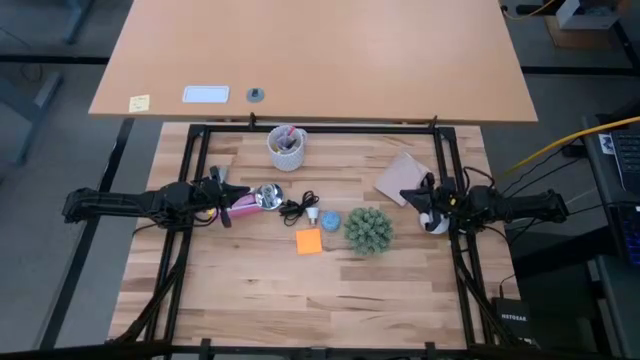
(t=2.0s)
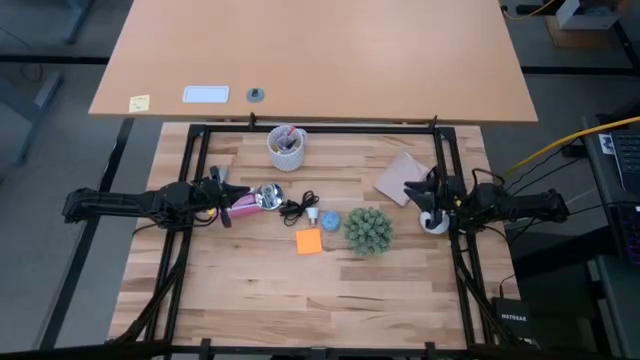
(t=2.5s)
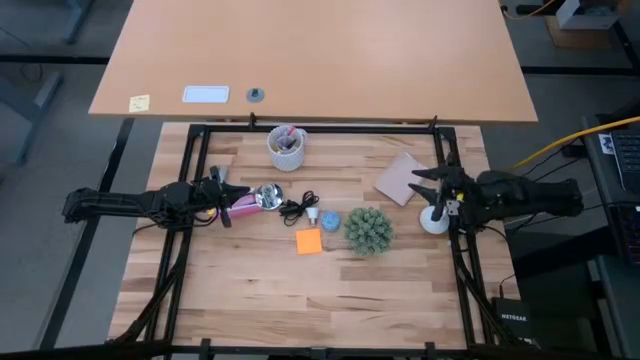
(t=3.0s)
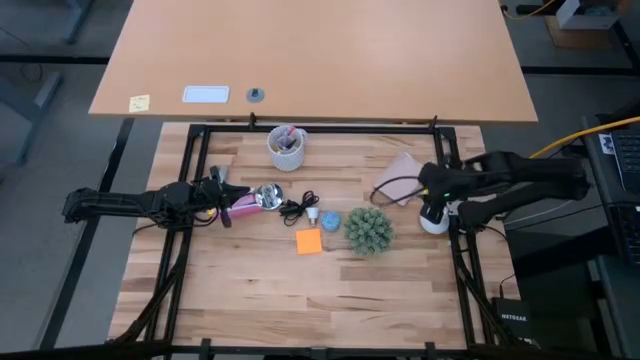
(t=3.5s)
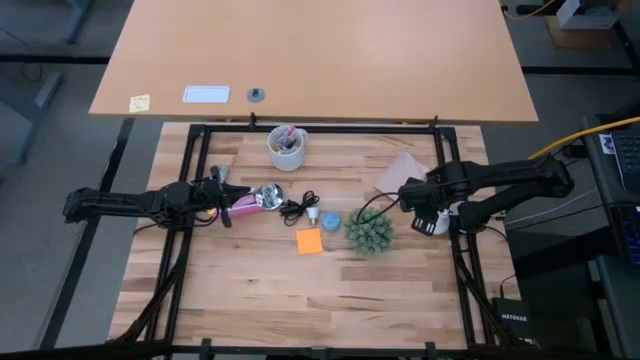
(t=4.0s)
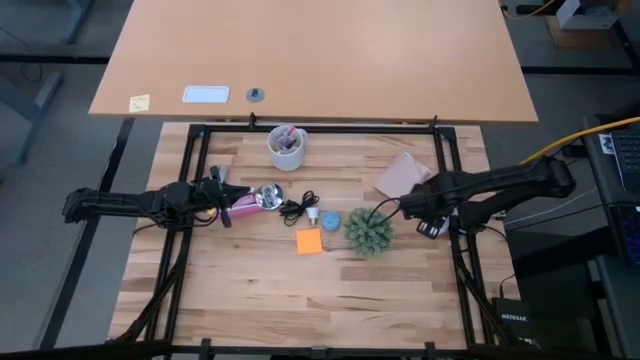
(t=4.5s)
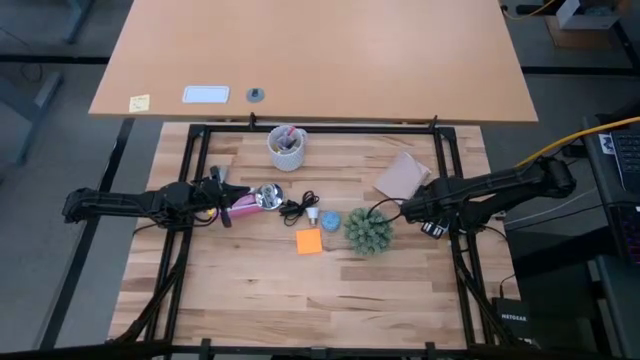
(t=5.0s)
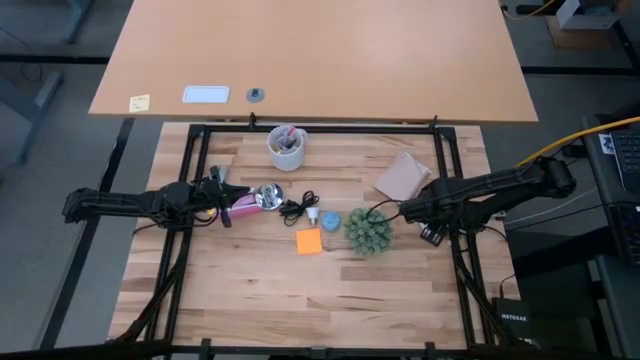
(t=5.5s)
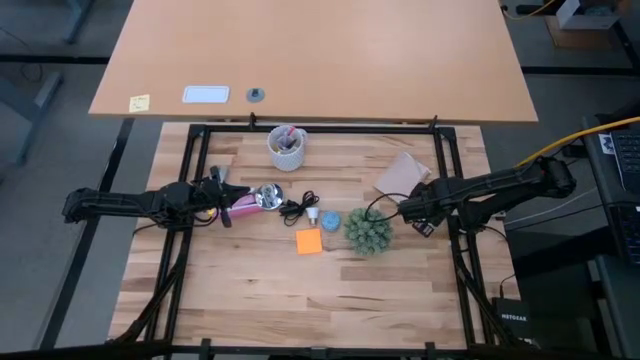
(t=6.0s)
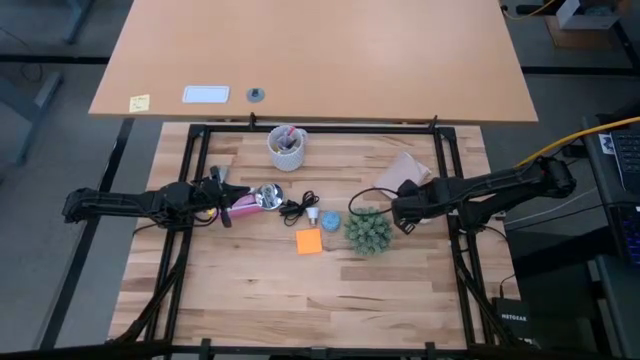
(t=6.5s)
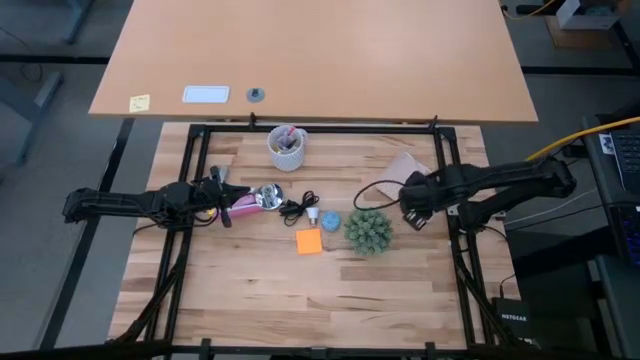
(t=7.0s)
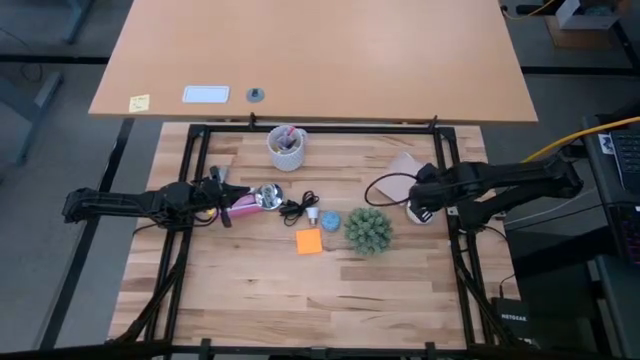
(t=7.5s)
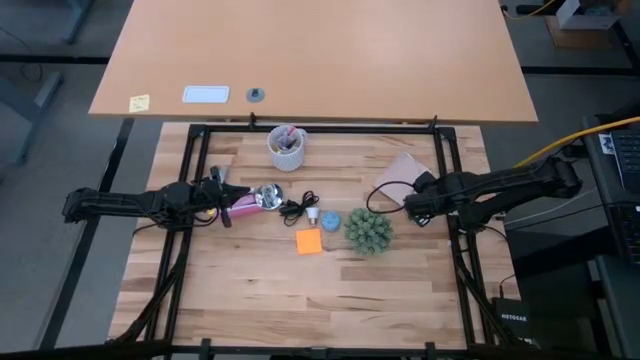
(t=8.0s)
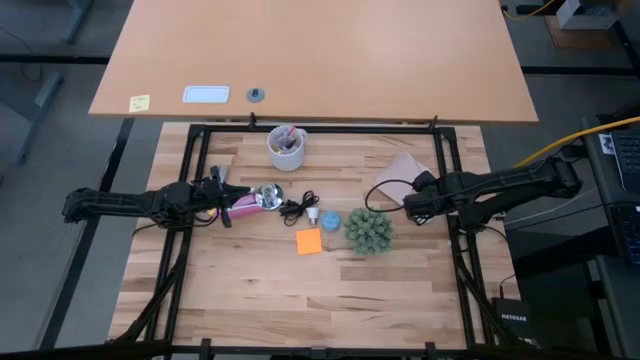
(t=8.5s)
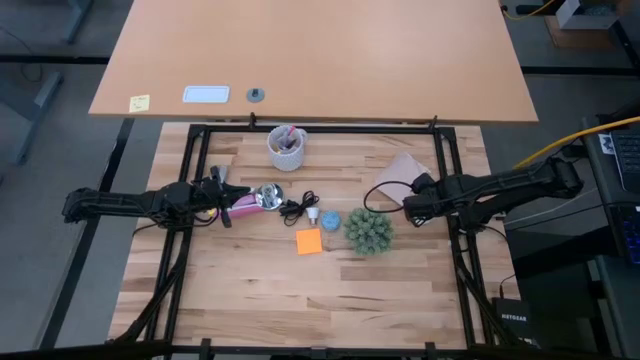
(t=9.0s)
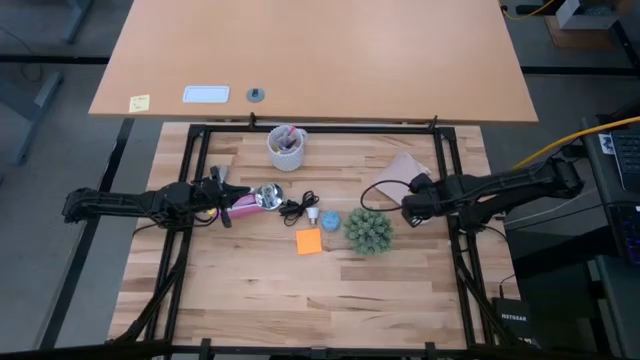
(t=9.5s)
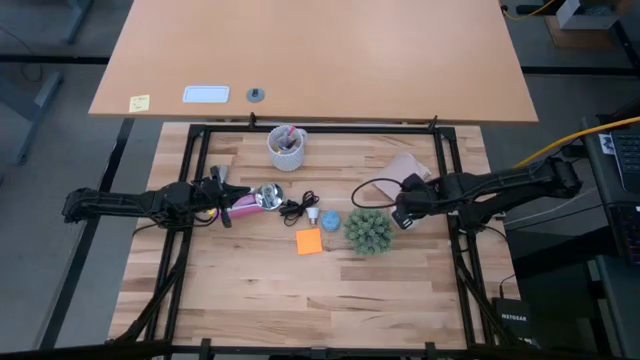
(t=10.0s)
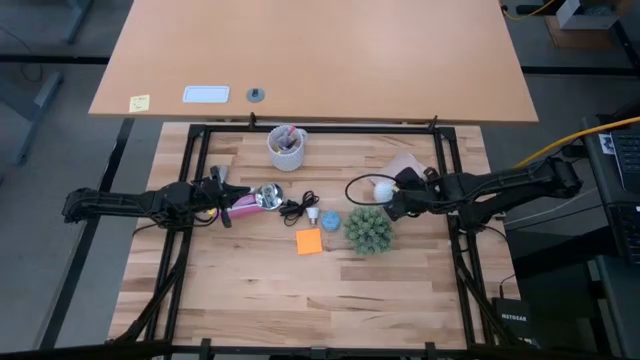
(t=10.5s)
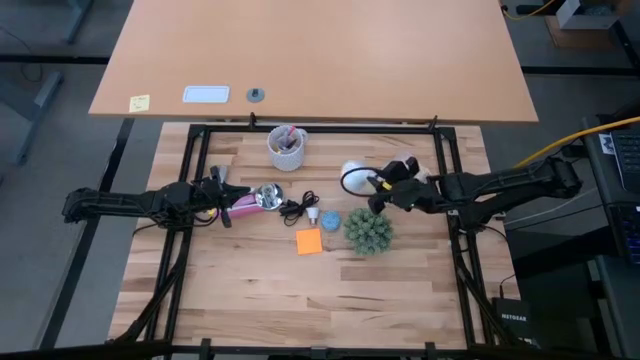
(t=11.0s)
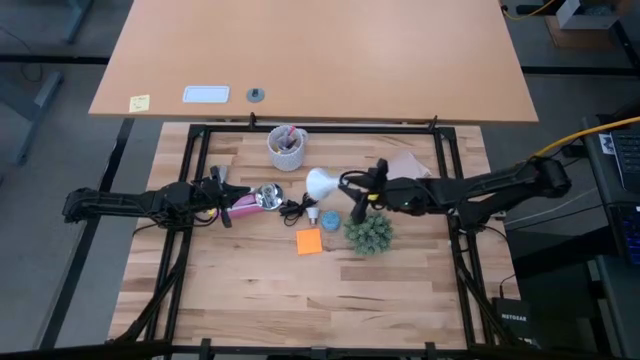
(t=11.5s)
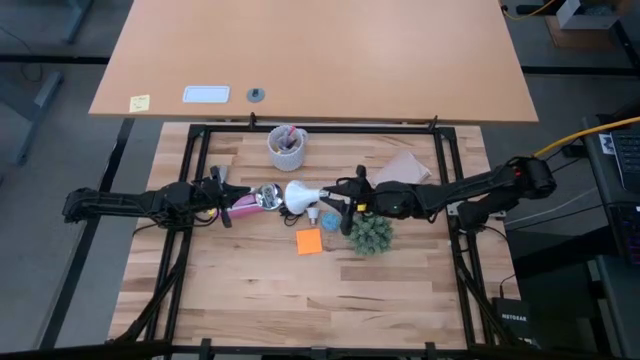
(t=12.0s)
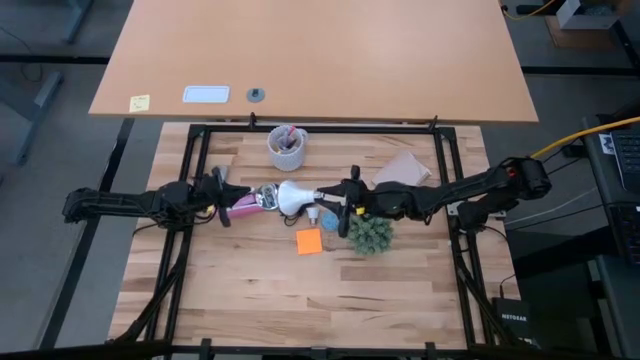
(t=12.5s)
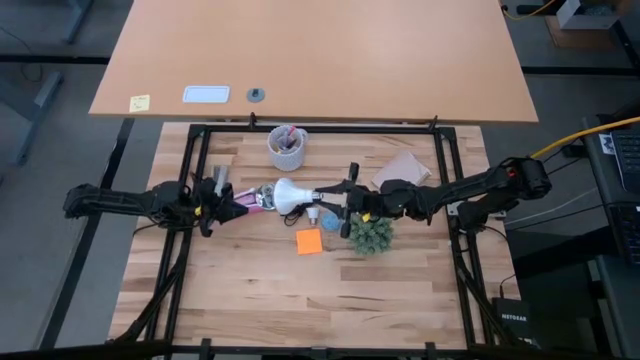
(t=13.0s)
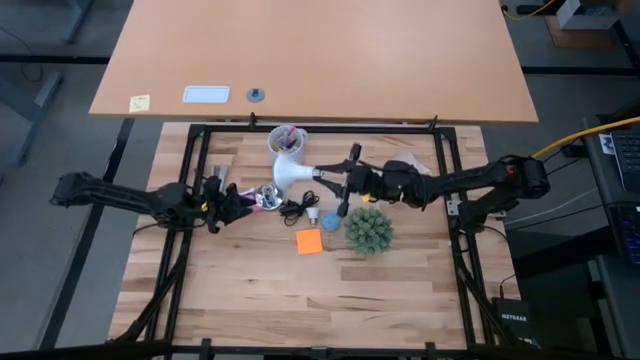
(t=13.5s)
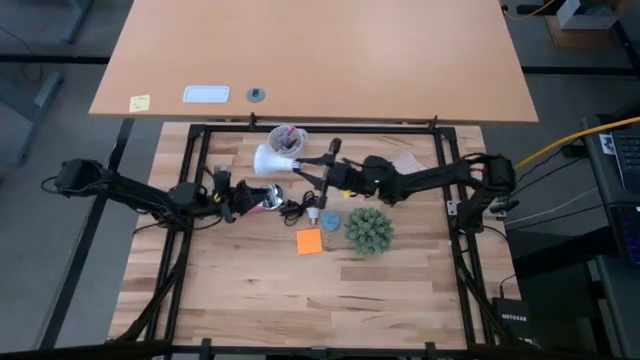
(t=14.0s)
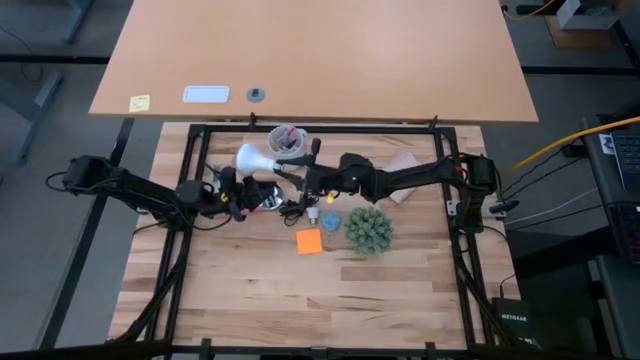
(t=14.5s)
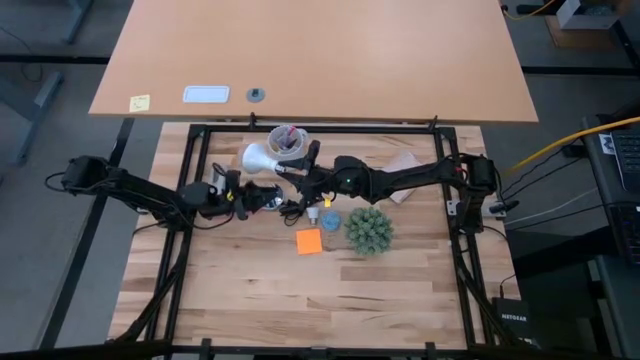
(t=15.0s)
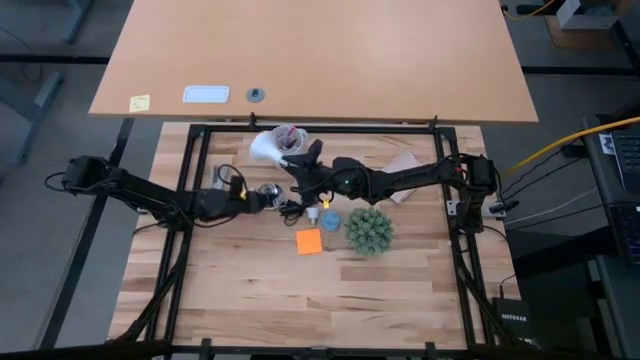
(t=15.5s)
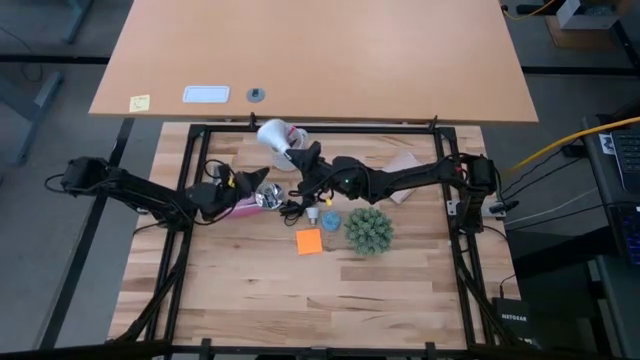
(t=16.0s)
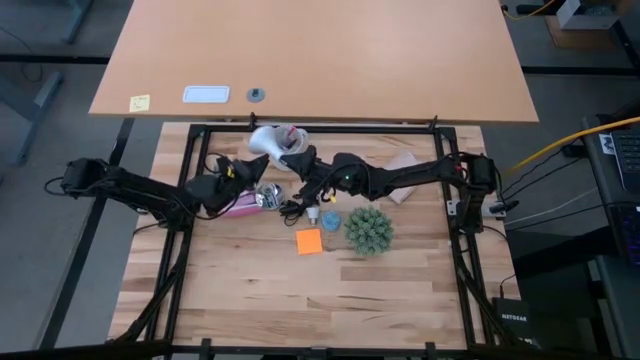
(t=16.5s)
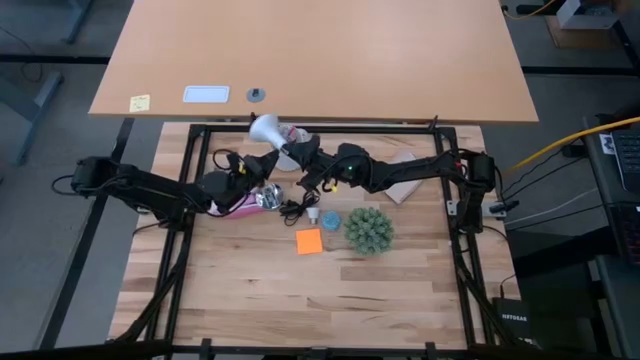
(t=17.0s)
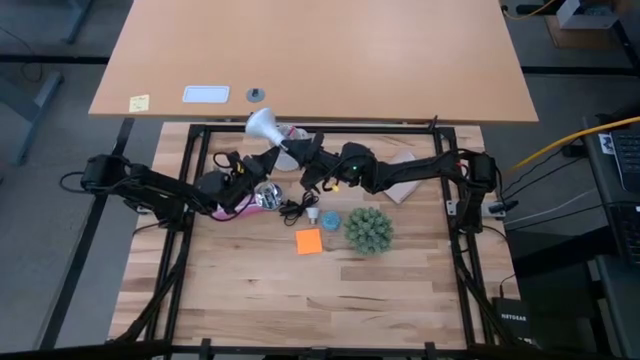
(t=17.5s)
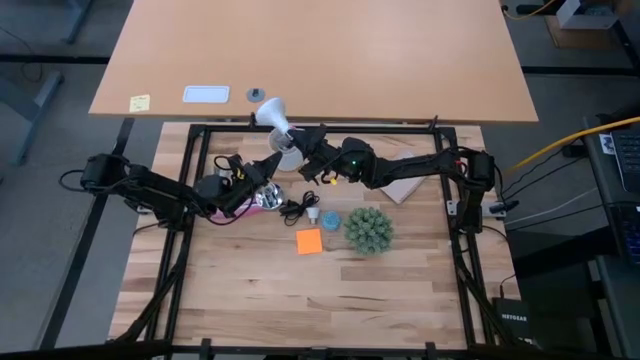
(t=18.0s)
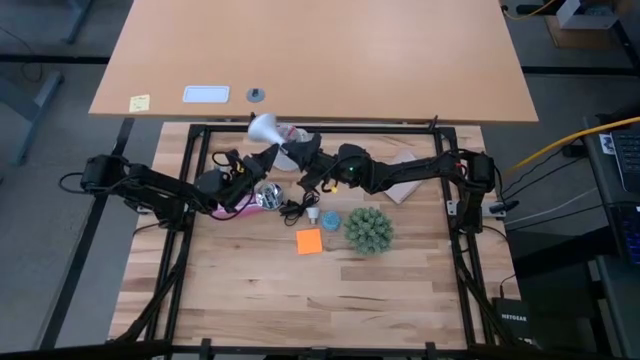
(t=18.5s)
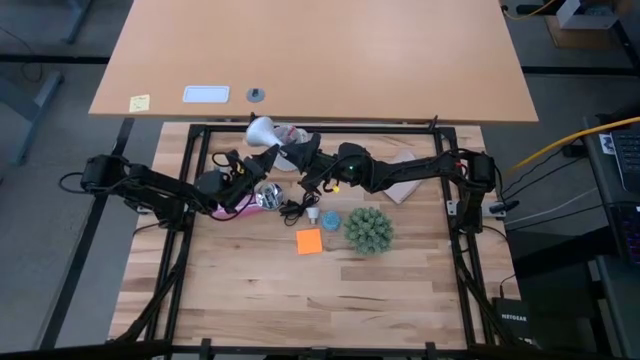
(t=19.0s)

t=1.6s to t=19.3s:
Task: Screw lightbulb
Insert the lightbulb into the silver lamp

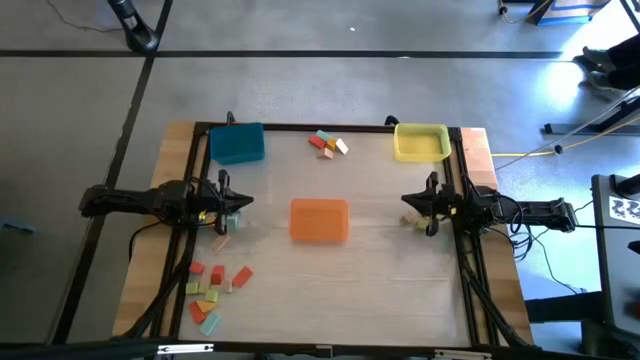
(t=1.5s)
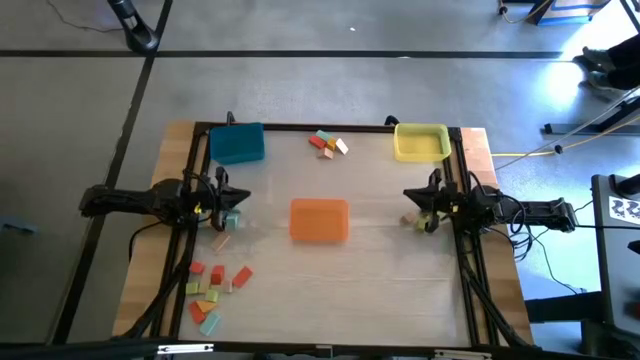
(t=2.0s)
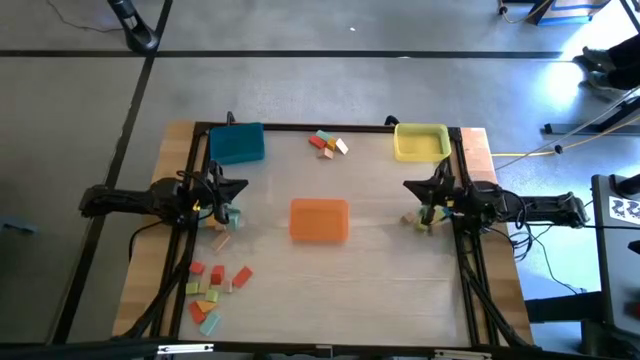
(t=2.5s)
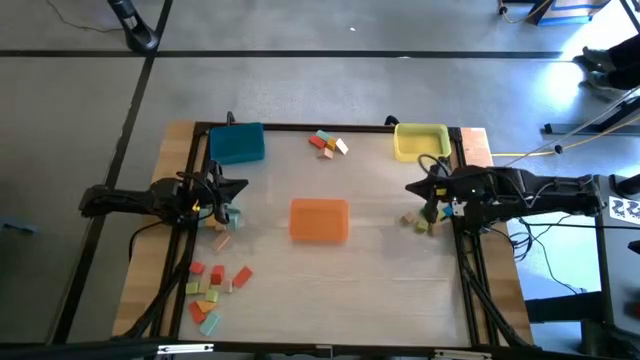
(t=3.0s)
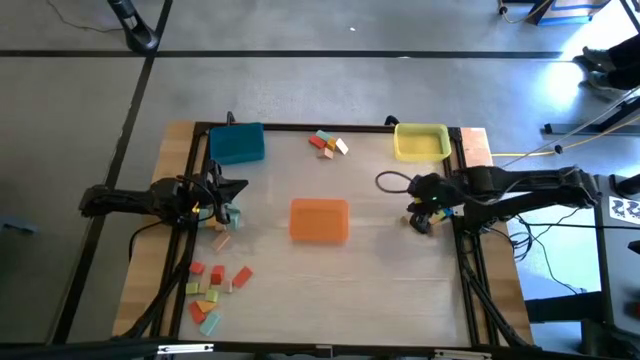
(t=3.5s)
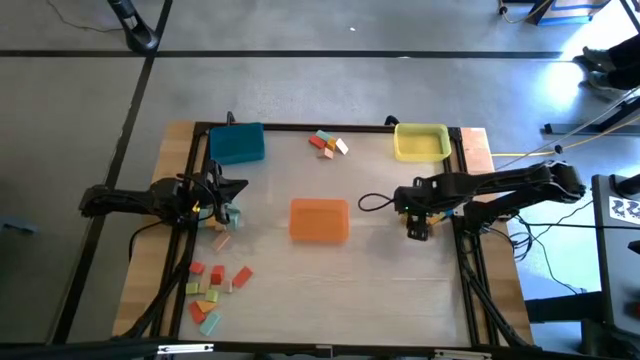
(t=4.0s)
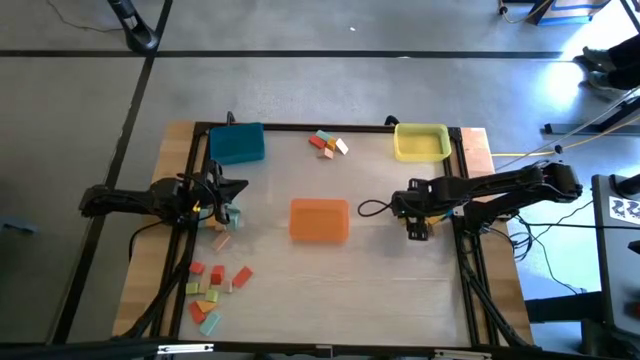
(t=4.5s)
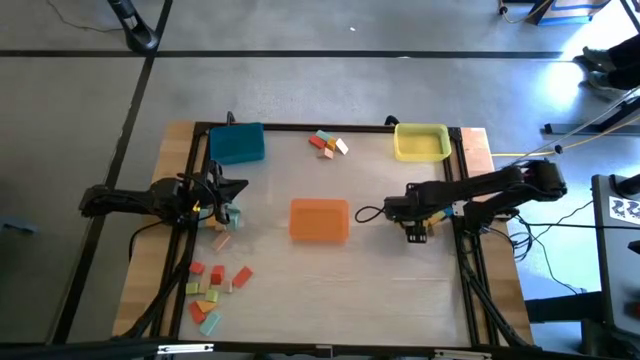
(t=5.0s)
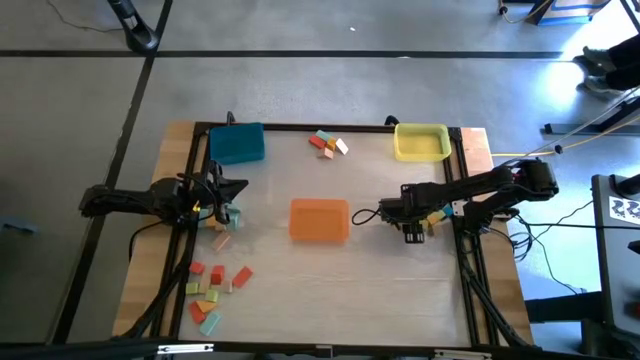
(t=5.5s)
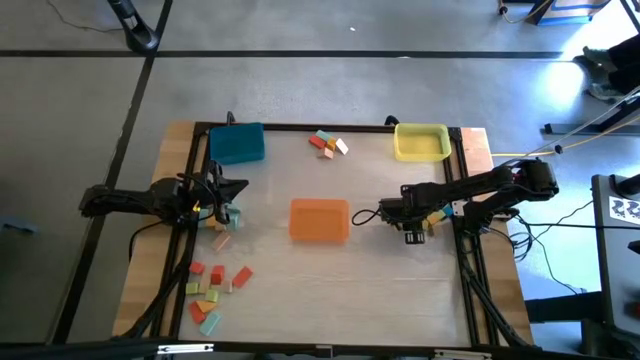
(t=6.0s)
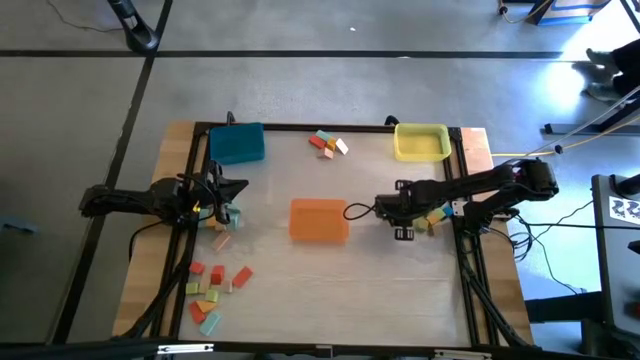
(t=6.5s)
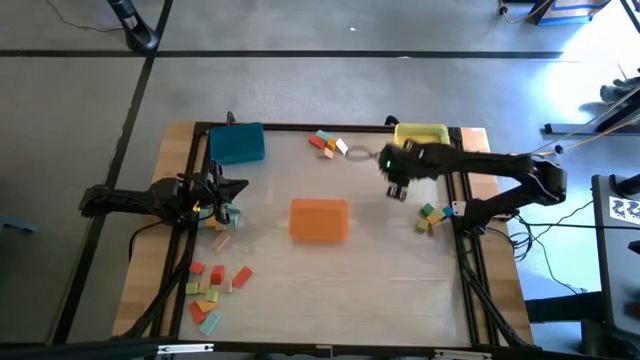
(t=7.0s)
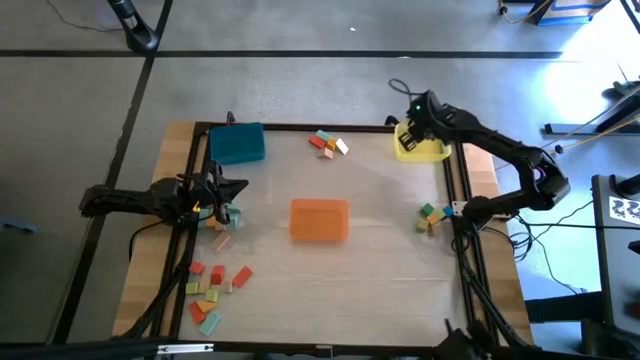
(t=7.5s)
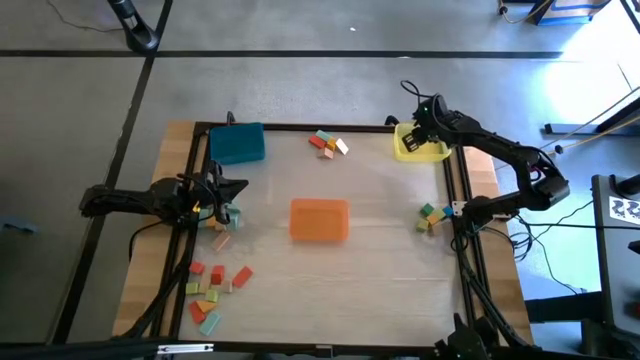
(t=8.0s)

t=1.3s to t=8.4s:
Task: Sort blocks by size
Put the brown cube block into the yellow bin
